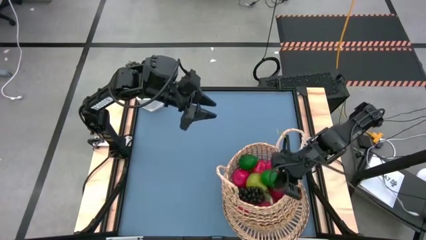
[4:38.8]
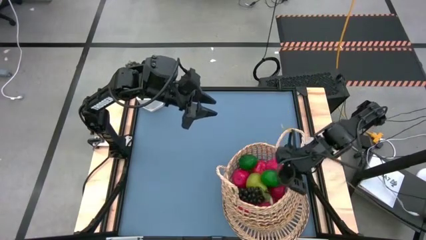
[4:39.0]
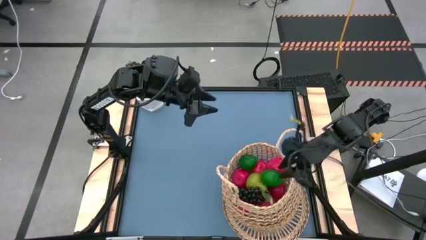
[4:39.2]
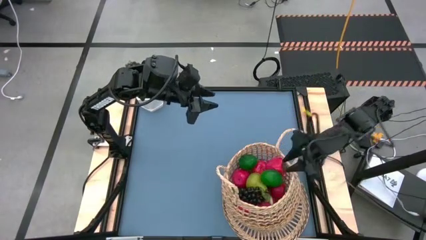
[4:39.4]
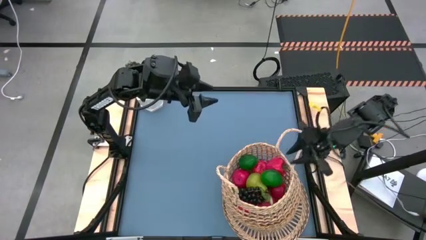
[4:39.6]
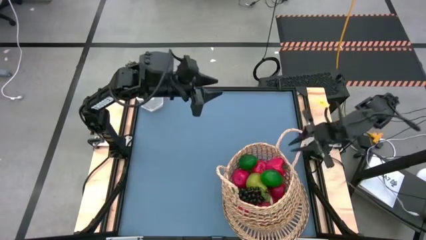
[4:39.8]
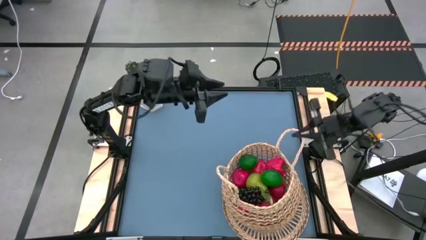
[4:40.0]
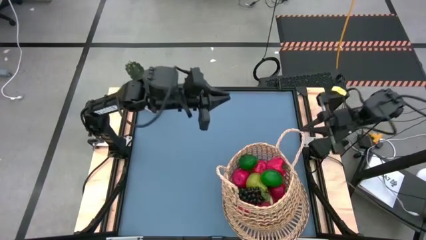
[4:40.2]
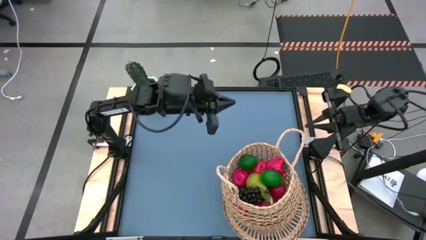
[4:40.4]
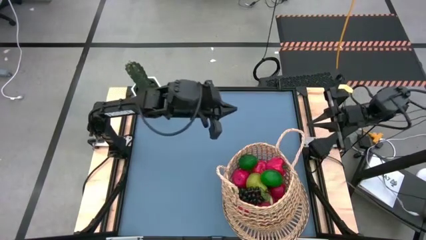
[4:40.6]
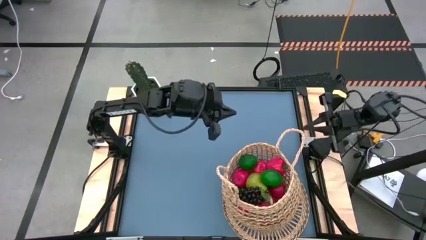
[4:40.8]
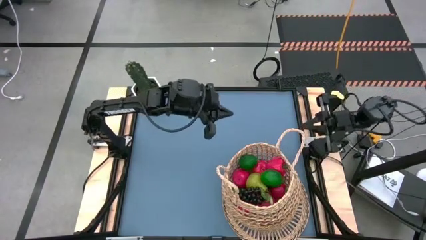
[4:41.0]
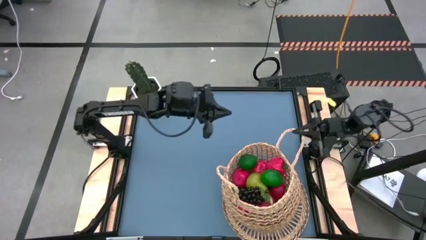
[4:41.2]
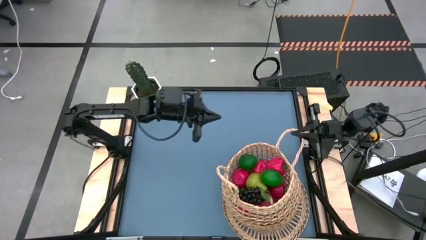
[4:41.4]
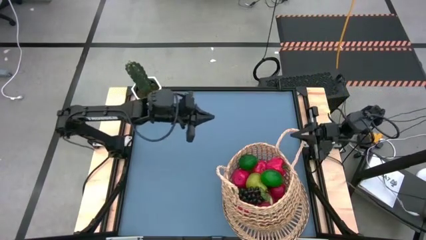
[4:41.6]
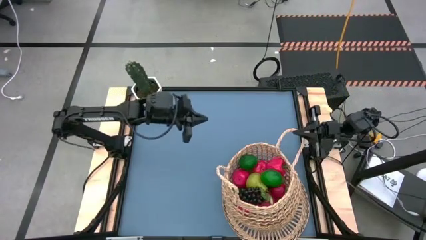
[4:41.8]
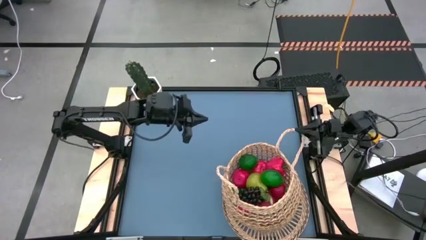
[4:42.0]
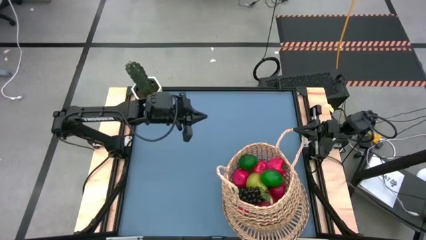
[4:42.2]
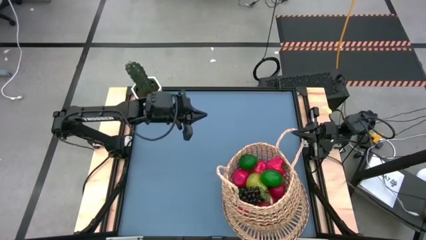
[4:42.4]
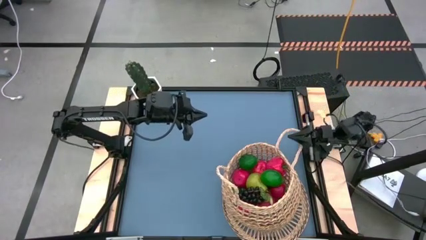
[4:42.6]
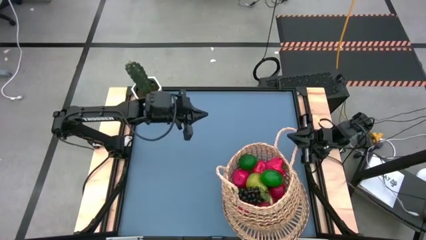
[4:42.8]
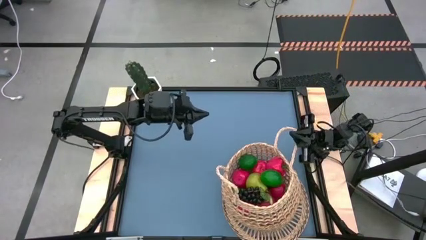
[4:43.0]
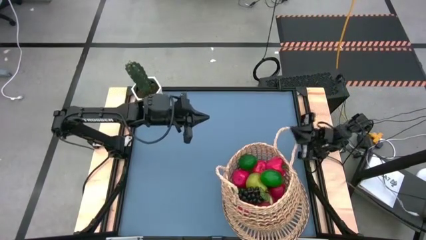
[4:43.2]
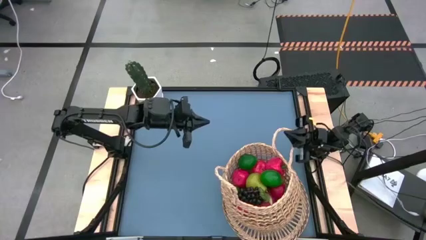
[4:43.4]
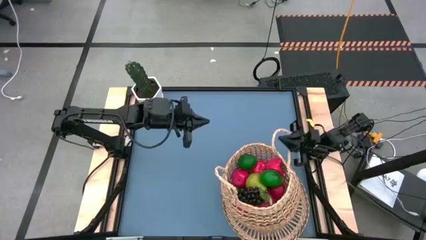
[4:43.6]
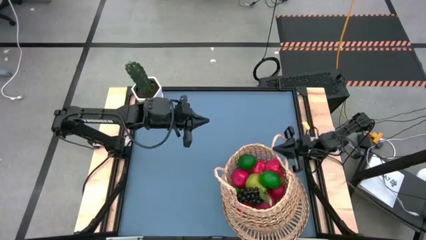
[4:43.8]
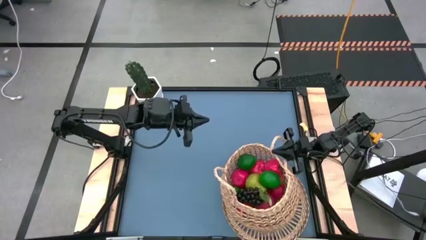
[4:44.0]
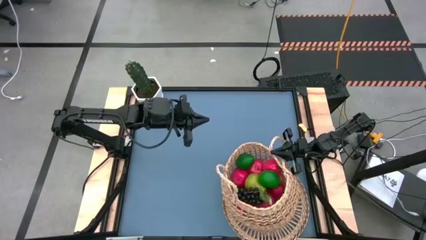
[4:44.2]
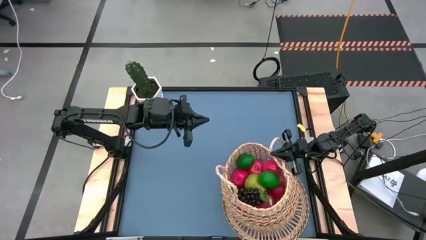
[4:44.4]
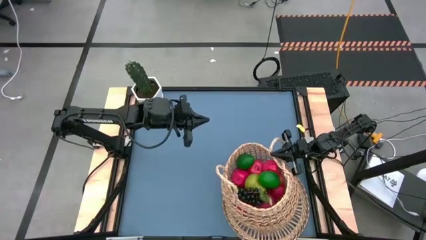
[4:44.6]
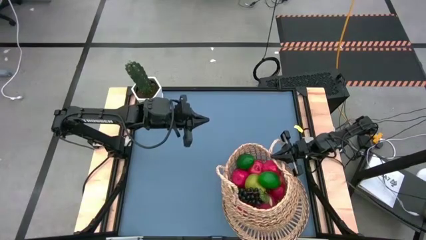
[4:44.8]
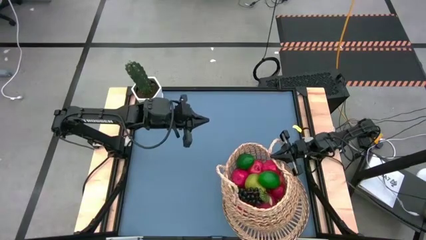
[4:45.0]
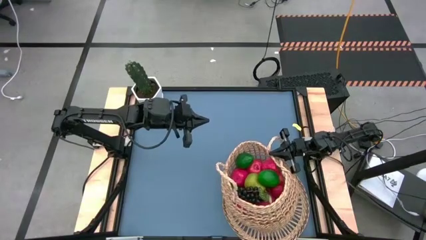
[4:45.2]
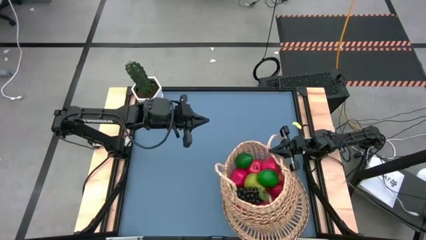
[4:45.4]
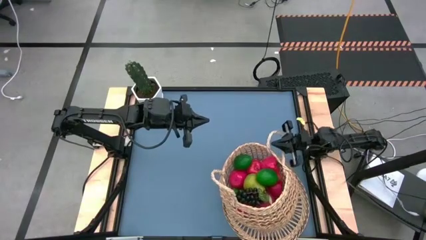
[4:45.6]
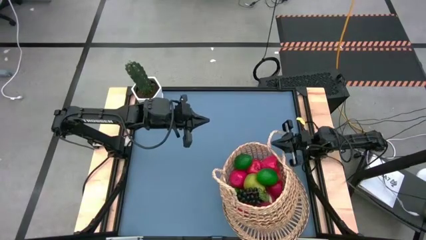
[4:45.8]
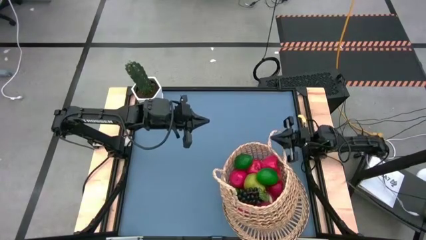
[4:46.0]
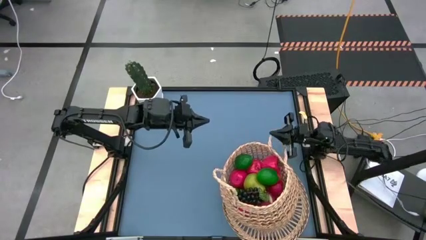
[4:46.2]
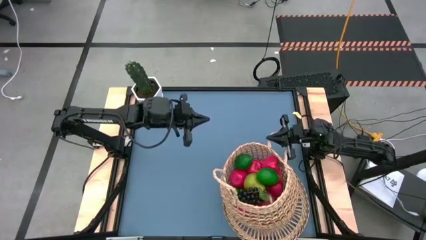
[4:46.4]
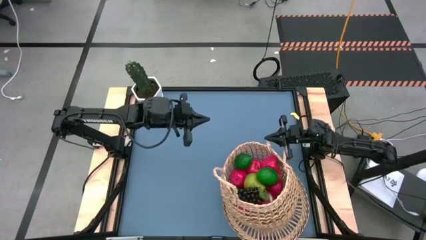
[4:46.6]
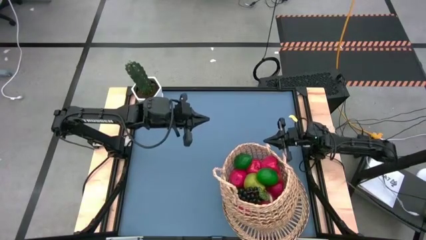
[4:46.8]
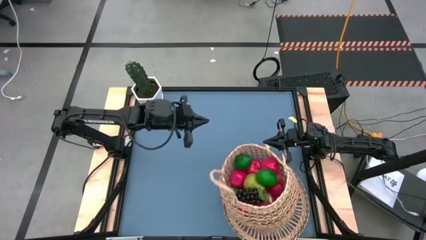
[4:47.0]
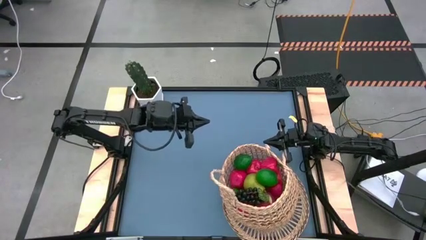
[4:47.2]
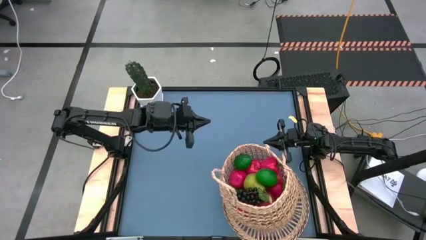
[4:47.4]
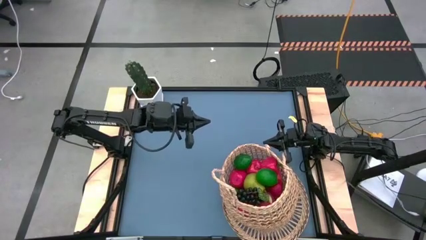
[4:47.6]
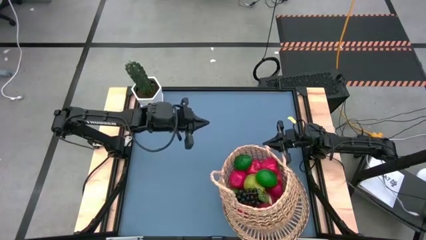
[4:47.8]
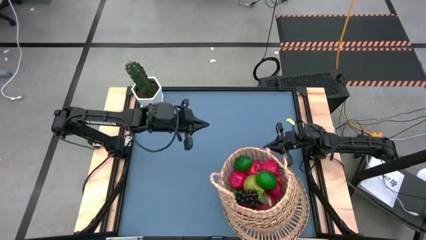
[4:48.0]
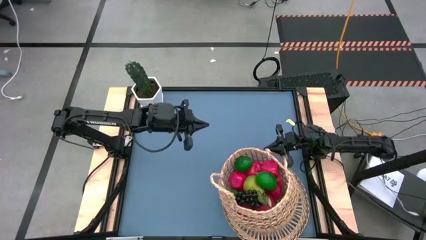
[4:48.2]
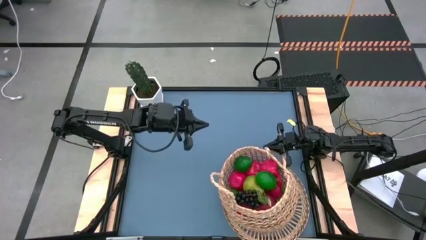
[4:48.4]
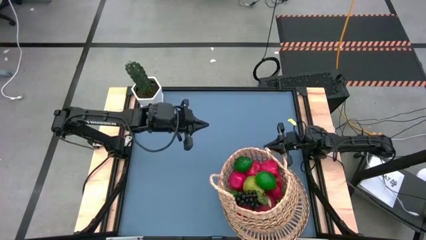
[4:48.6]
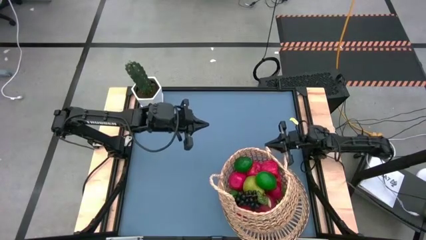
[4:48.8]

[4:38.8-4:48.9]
Task: Build produce basket
Return to Home Position

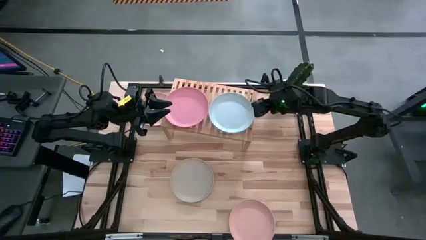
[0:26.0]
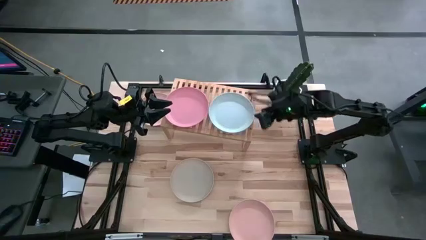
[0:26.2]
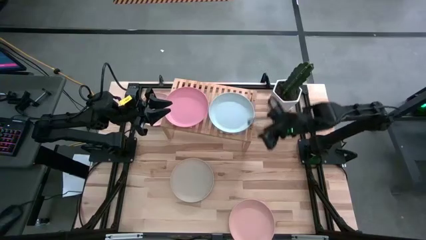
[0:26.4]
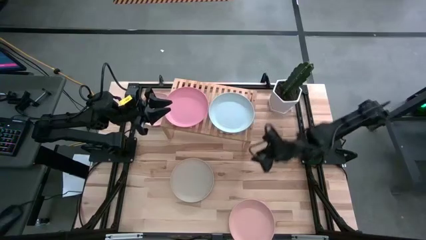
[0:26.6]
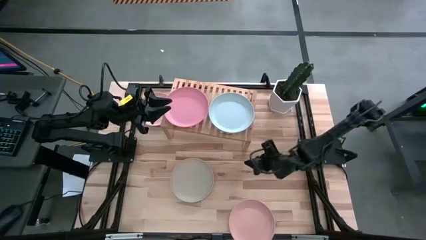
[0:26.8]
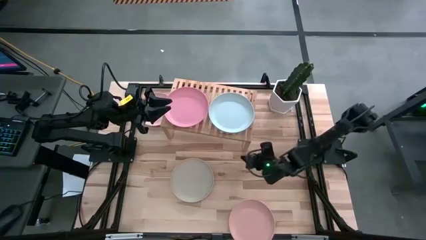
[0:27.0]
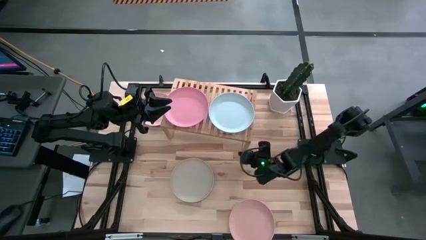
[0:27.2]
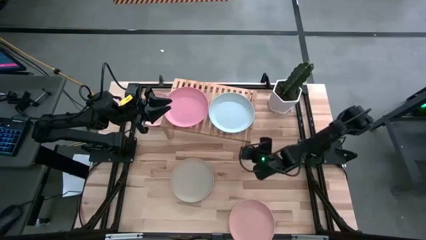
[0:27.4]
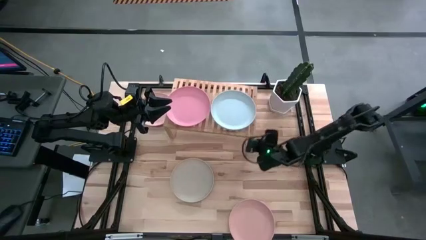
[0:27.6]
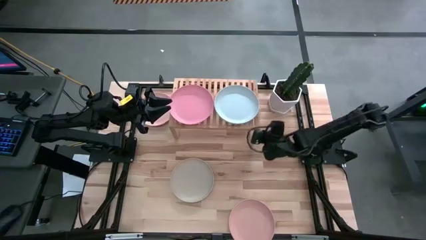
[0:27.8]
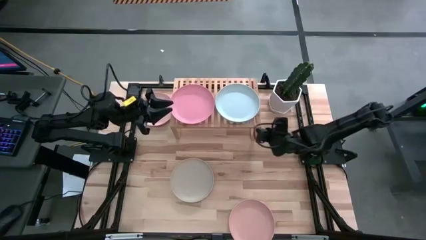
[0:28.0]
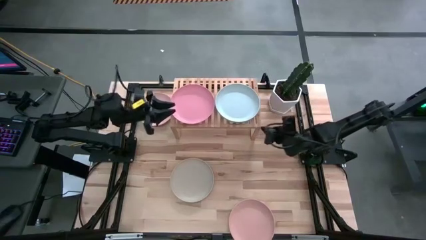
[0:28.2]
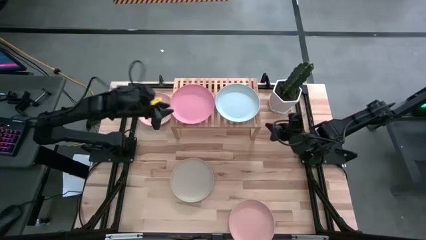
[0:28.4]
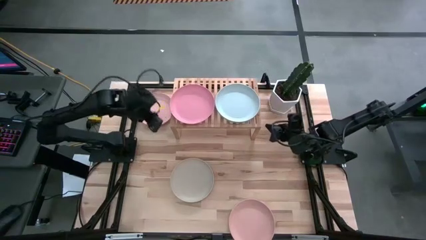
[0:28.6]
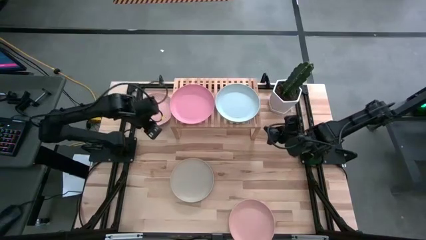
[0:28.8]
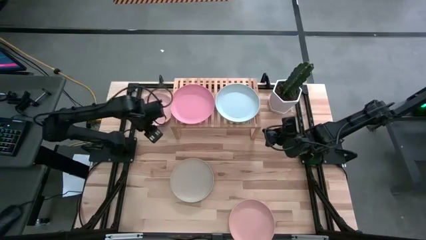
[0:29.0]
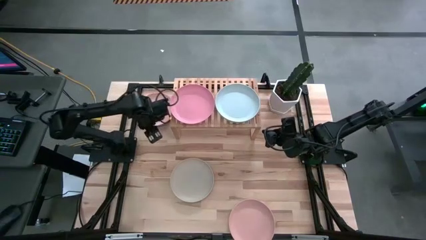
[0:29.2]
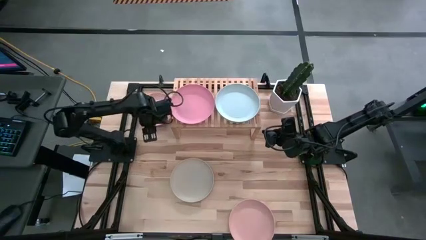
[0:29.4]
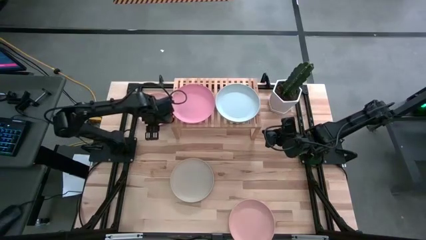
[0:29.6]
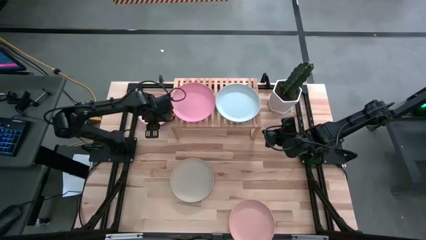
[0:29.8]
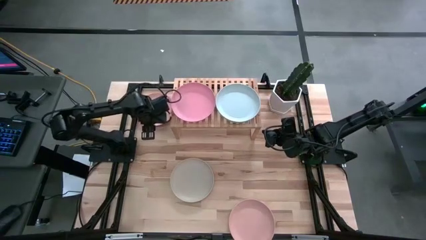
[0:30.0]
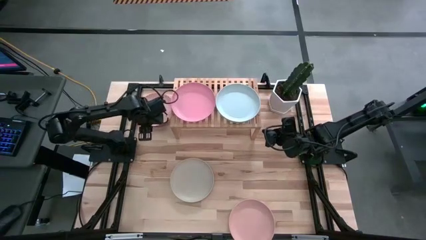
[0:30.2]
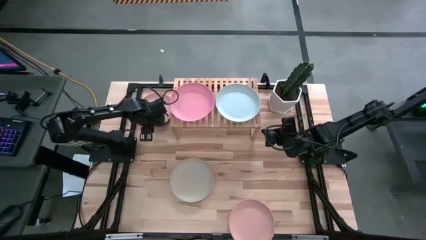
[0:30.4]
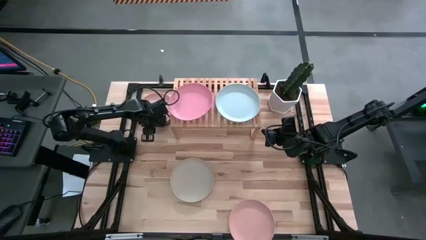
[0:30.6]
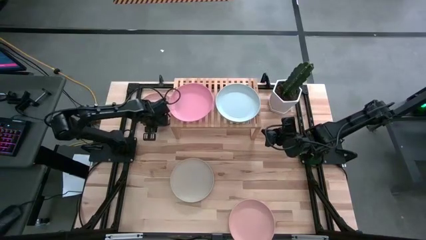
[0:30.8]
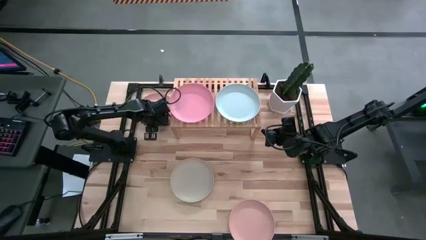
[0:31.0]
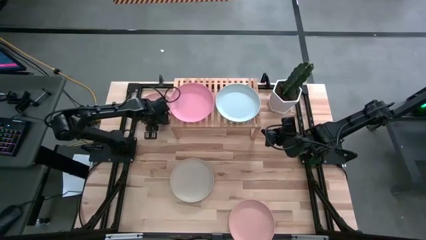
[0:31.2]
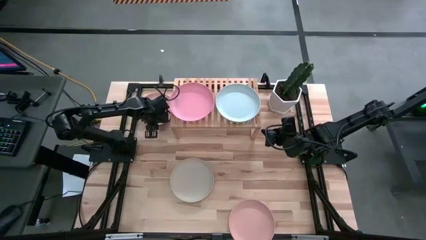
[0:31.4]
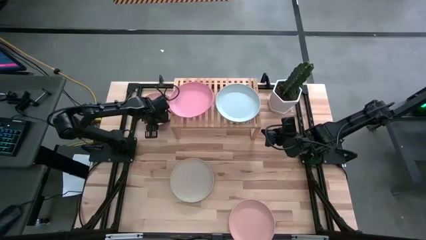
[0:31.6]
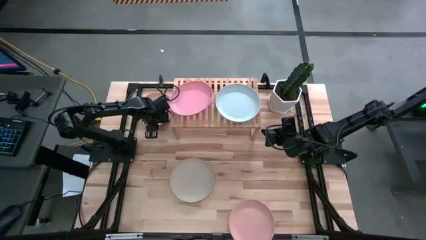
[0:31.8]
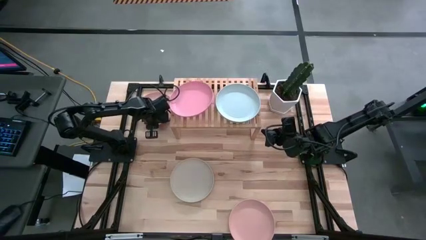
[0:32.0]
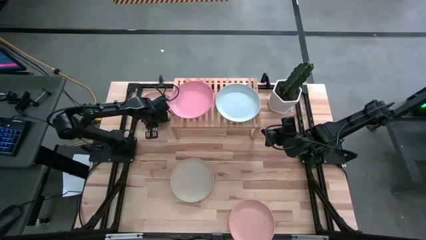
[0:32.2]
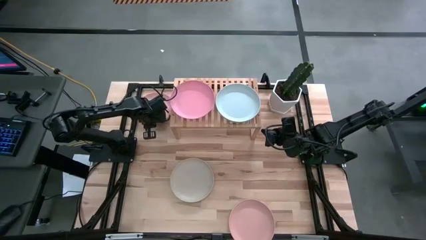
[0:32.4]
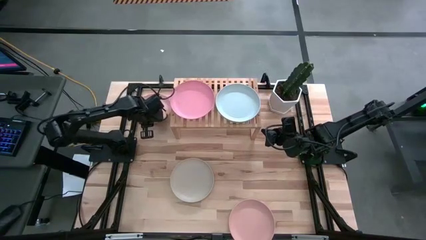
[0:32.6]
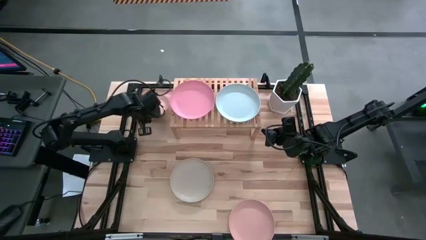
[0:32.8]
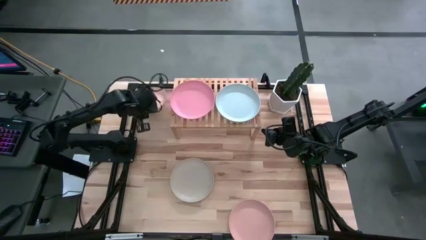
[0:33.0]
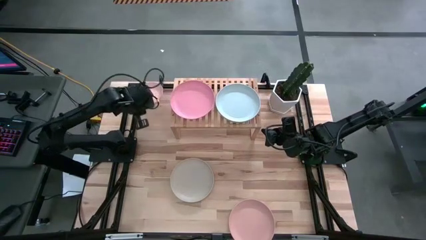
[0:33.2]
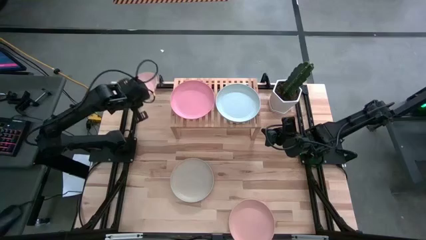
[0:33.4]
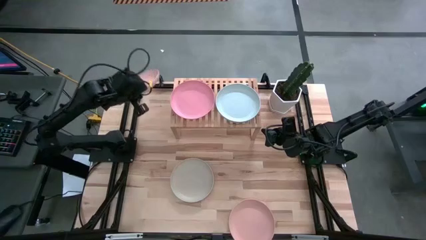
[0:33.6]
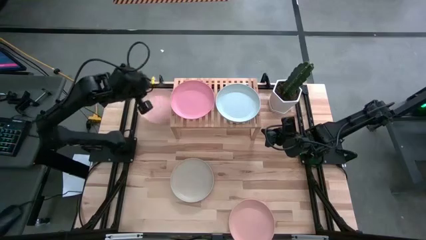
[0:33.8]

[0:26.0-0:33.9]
Task: Place and stack plates onto a shelf
Stack the top pink plate on top of the other pink plate on the shelf
